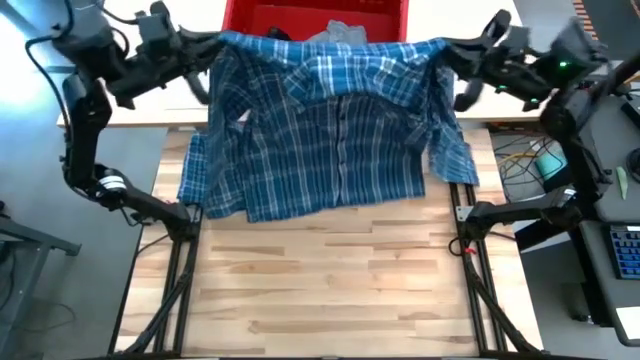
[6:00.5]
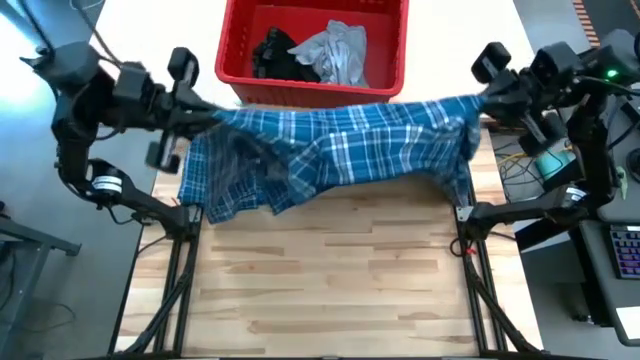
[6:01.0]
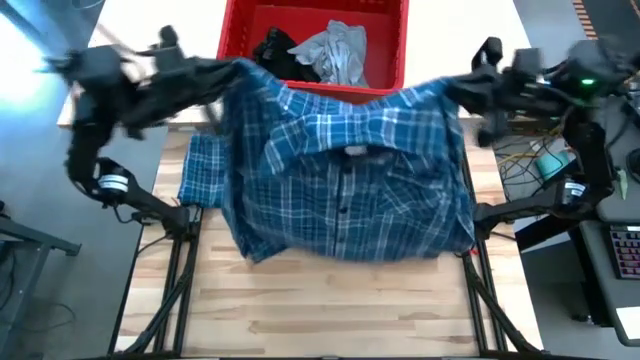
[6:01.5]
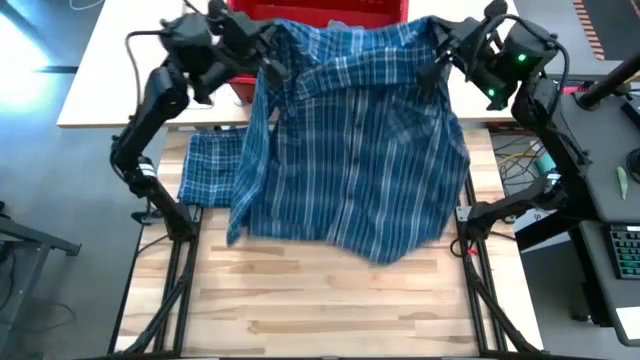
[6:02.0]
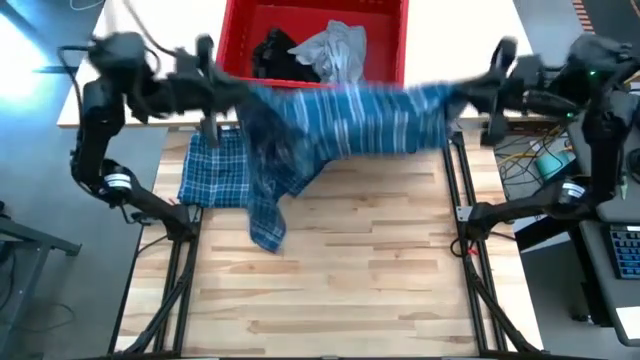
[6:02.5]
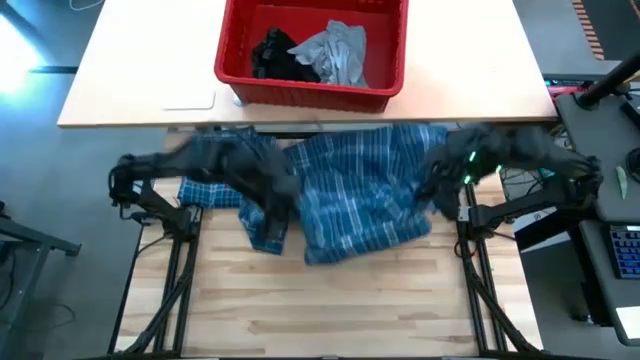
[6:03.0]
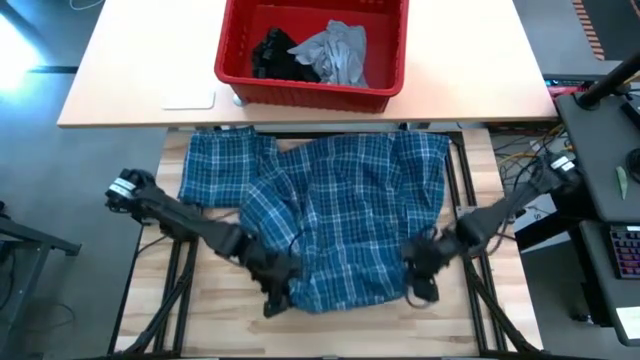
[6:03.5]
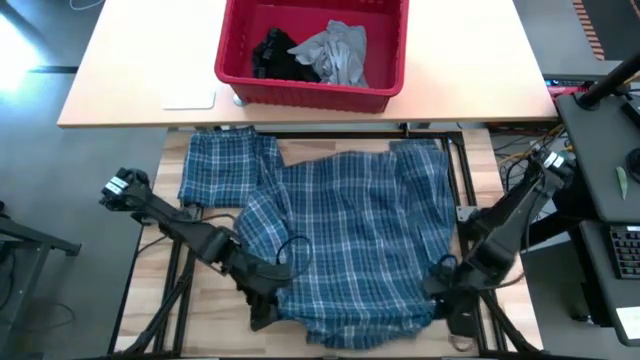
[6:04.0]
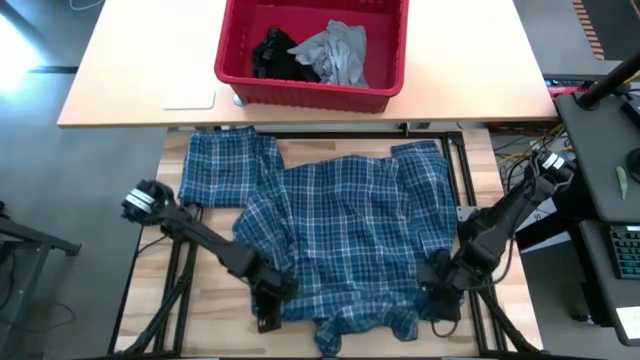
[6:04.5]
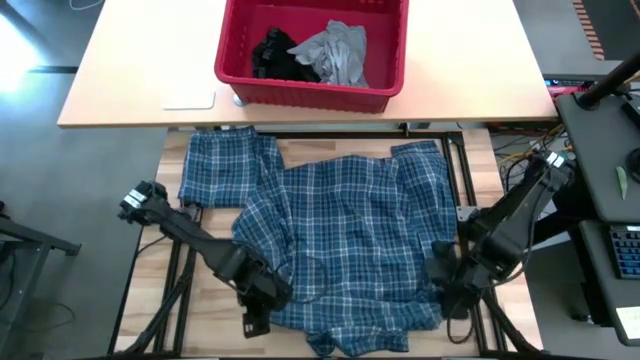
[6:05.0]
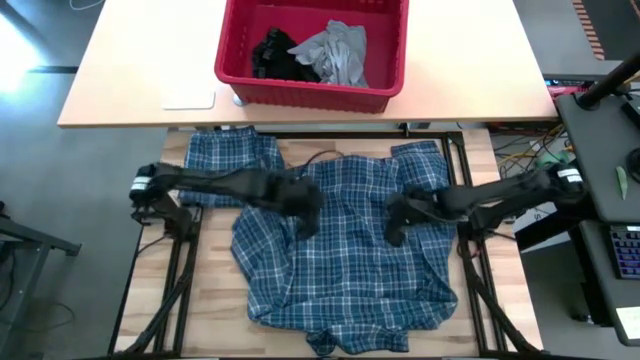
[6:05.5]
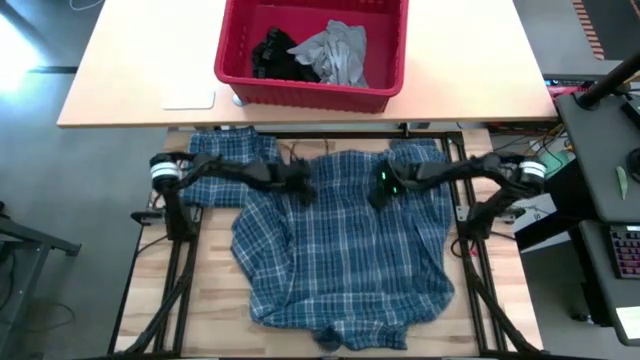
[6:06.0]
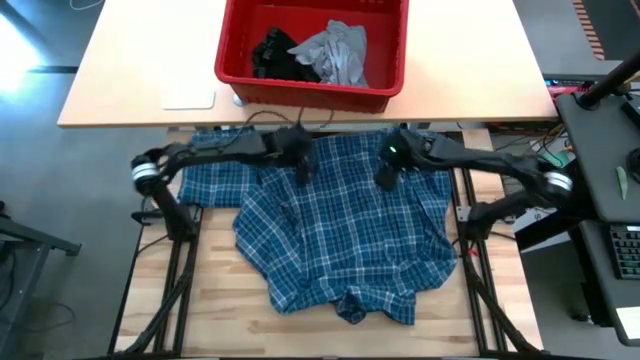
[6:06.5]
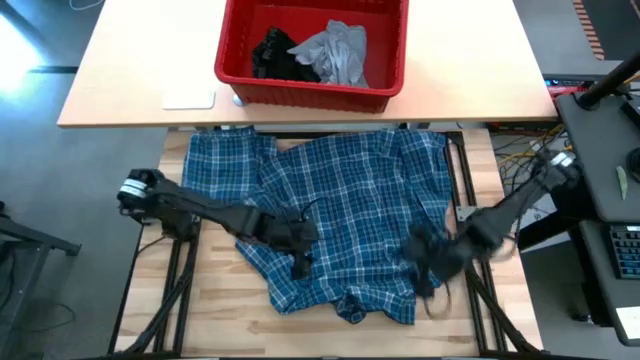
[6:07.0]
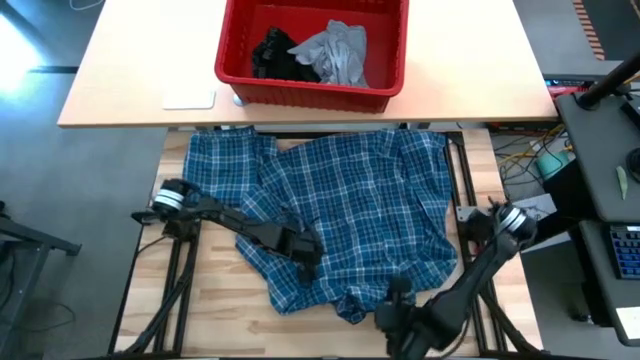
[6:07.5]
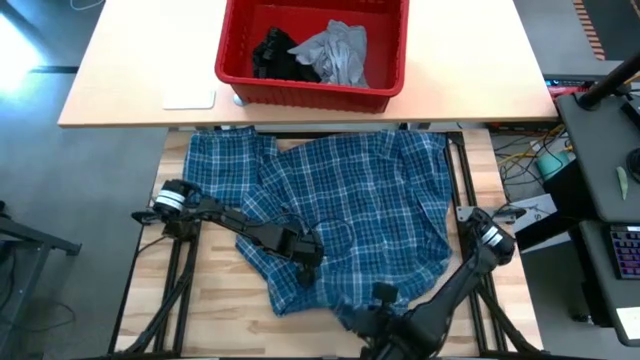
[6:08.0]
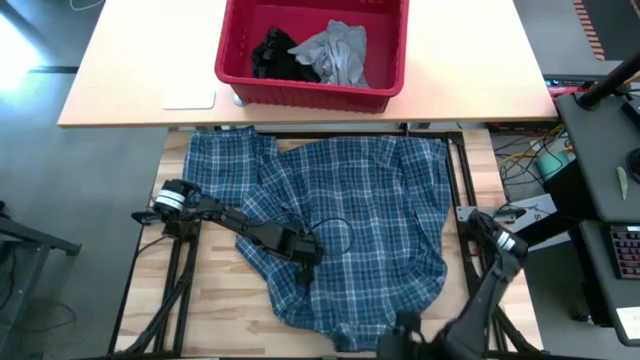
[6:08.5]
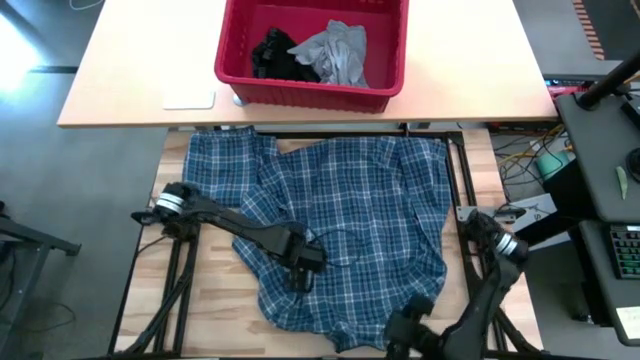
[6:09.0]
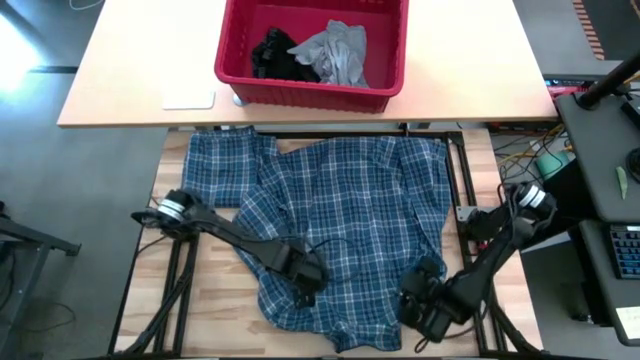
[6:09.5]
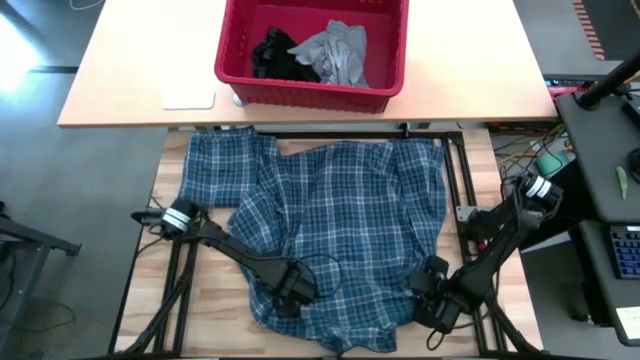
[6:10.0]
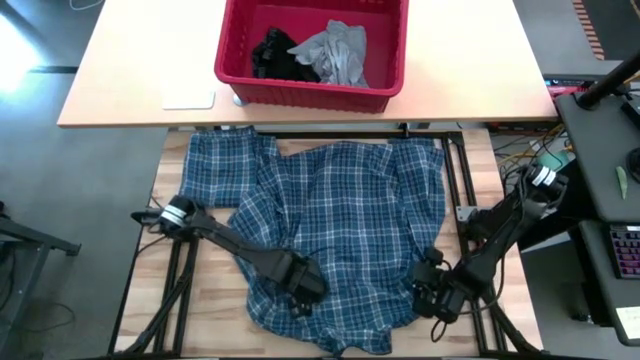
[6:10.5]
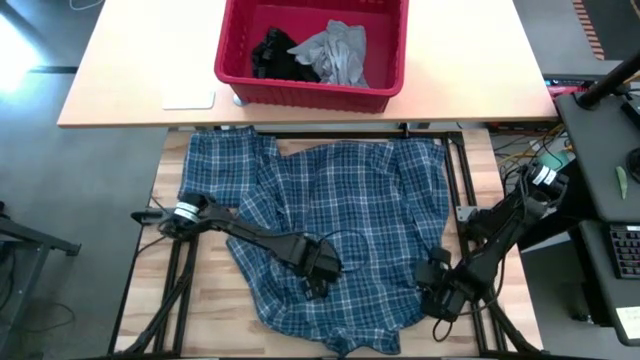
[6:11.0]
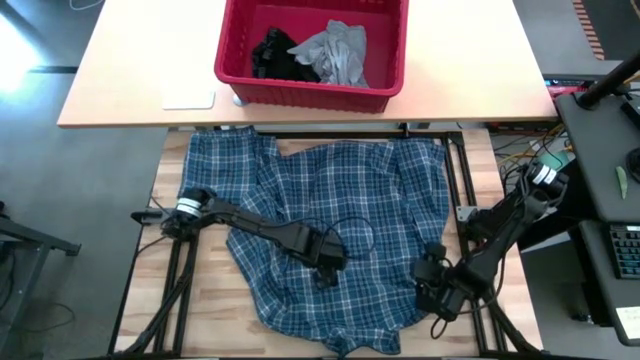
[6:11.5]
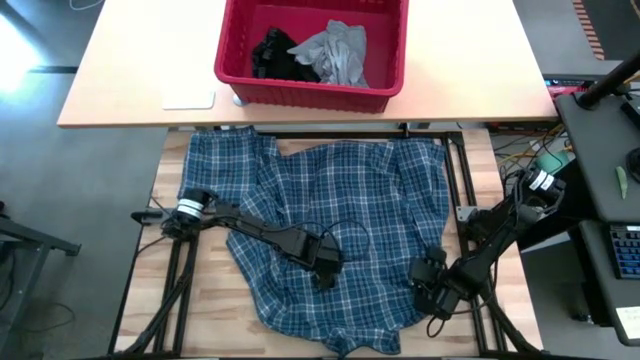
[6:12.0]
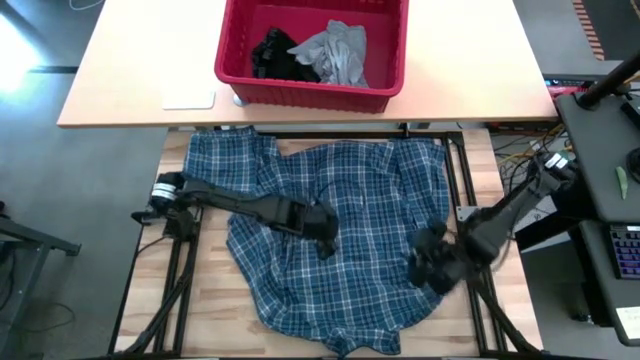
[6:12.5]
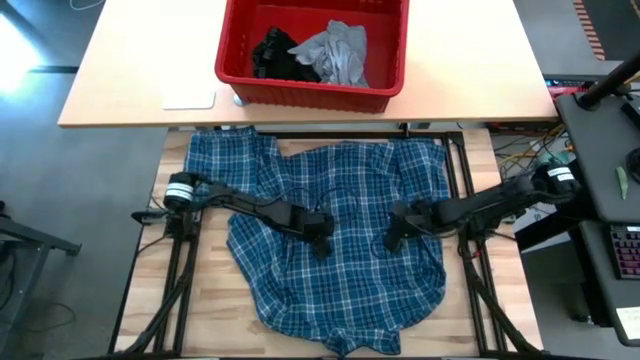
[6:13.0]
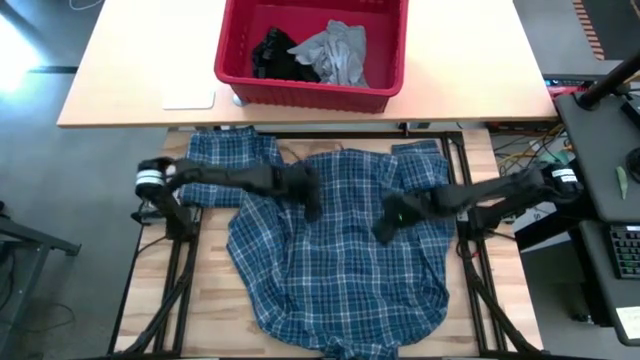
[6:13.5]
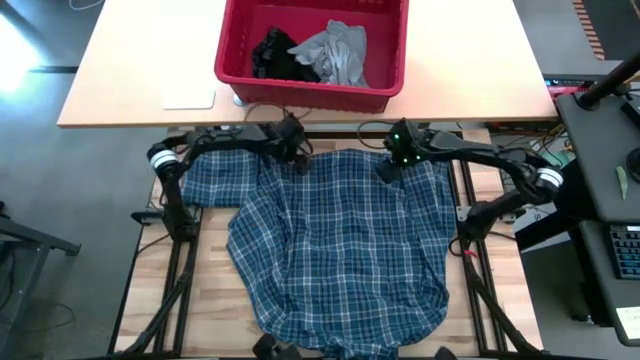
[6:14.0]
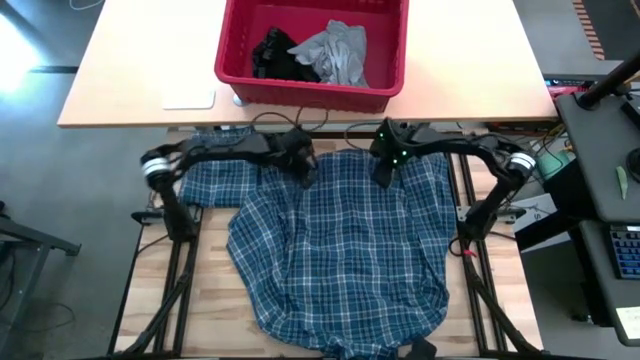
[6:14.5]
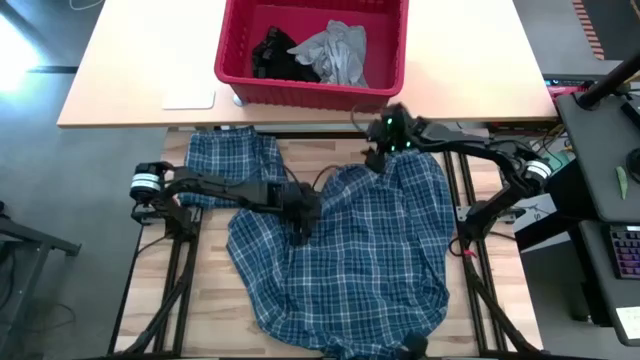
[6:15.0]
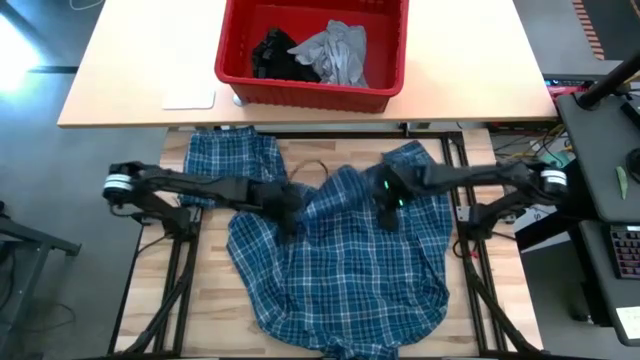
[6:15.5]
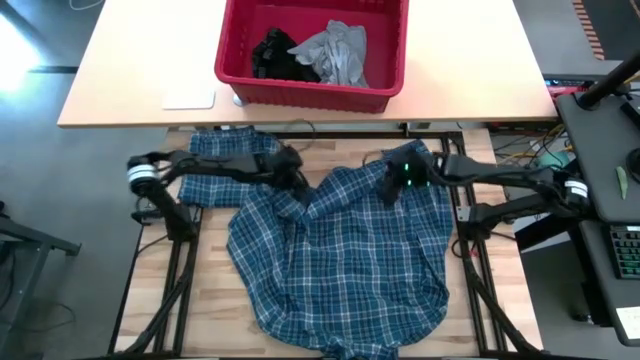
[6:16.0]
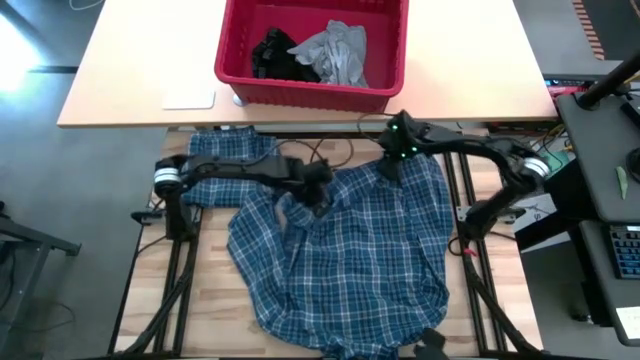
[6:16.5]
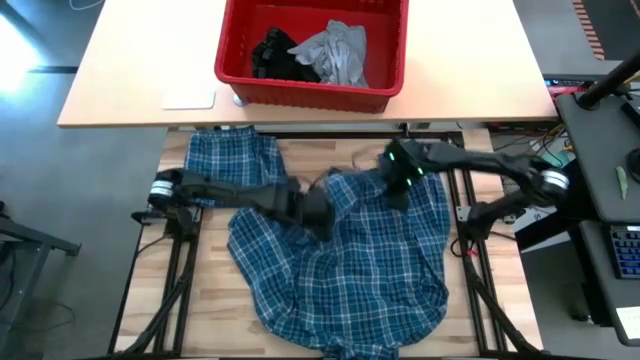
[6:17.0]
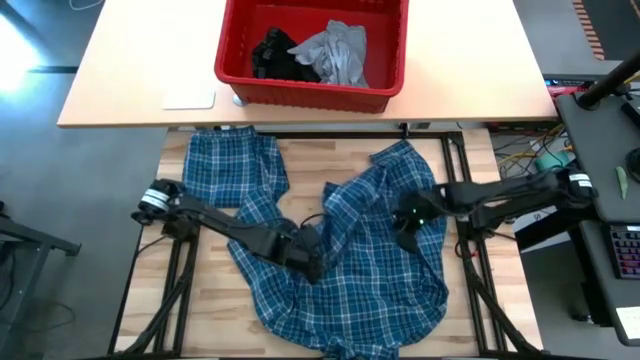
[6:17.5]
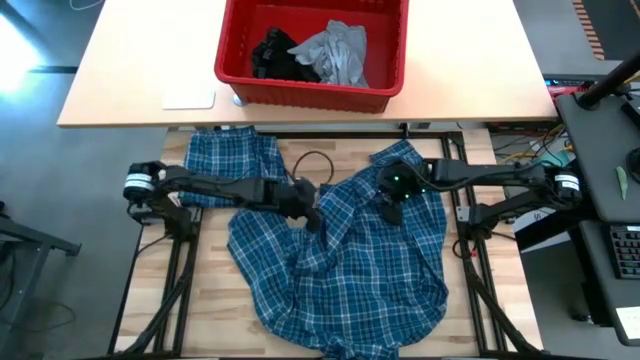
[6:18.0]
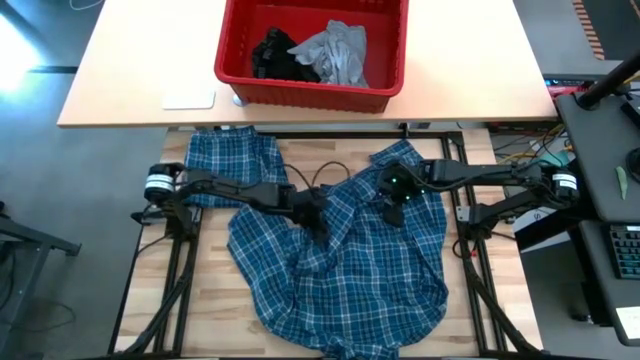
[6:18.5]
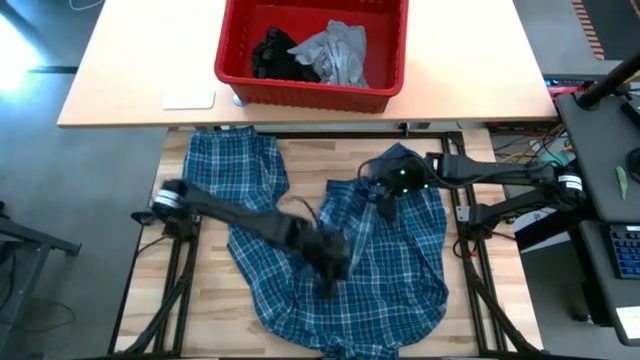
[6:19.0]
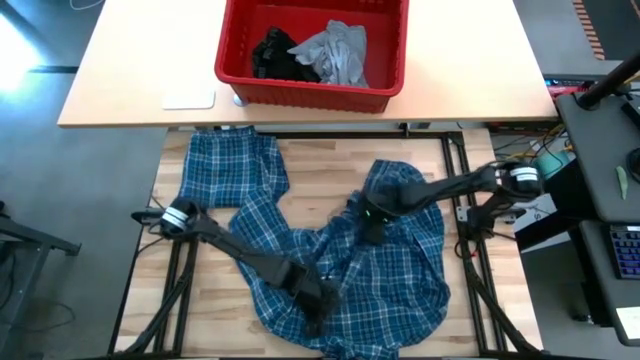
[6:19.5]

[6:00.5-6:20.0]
Task: Fold Laundry from Bin
Fold the blue patterned long sleeve shirt

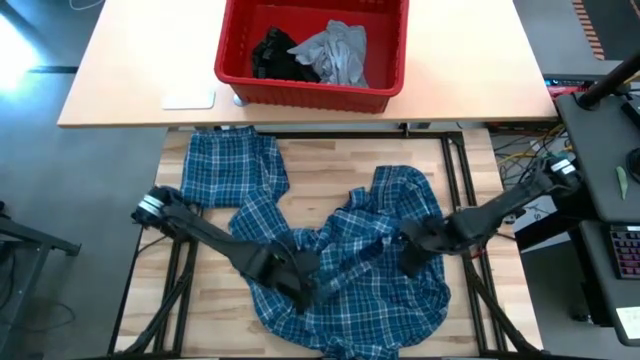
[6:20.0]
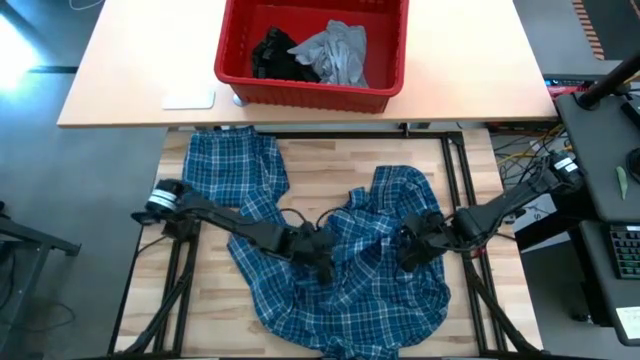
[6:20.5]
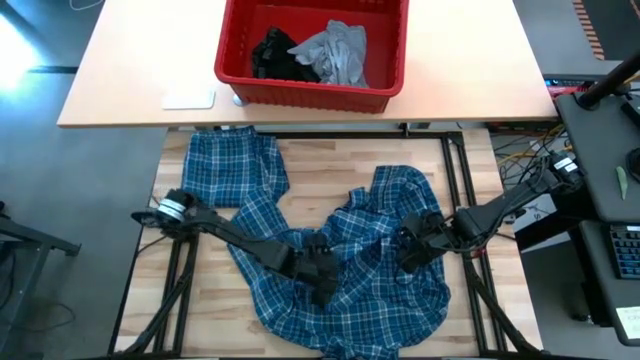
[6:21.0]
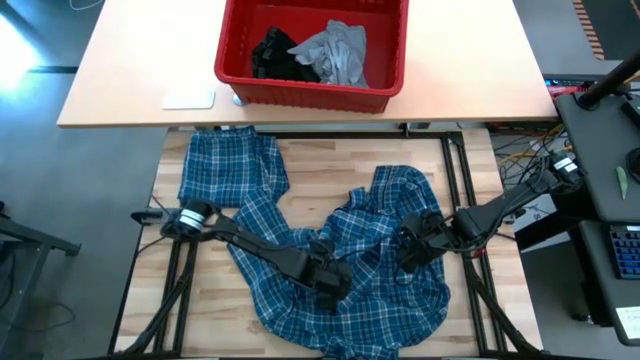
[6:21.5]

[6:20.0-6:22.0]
Fold the blue patterned long sleeve shirt
